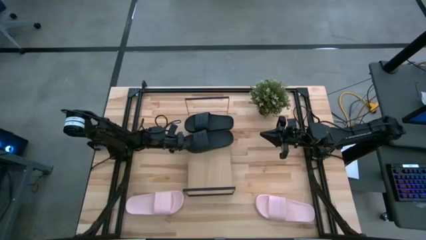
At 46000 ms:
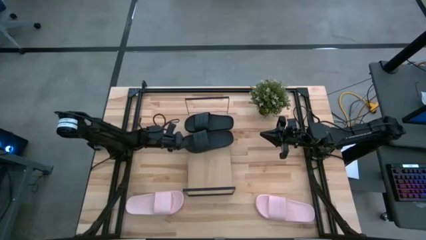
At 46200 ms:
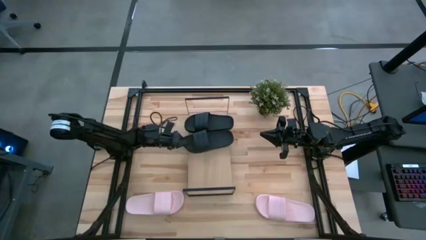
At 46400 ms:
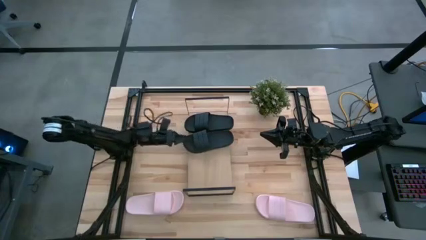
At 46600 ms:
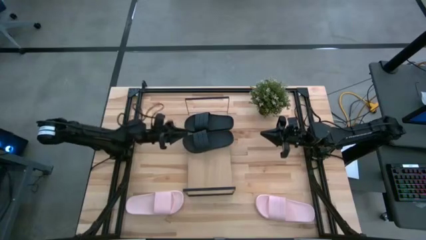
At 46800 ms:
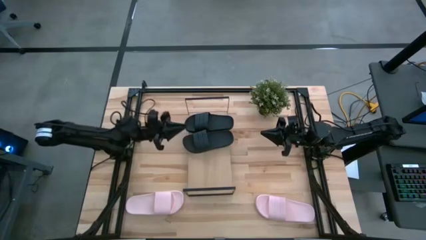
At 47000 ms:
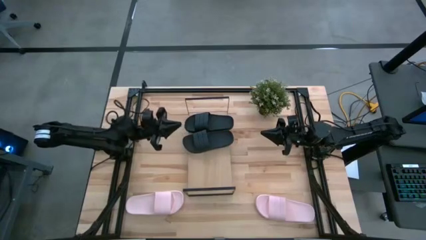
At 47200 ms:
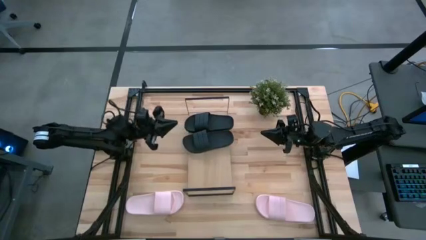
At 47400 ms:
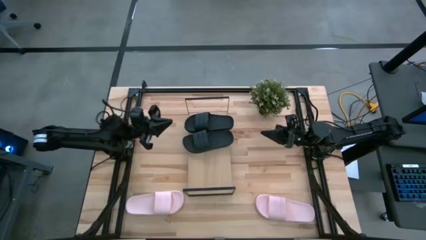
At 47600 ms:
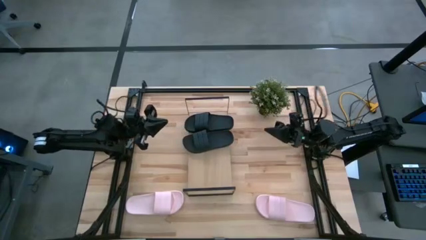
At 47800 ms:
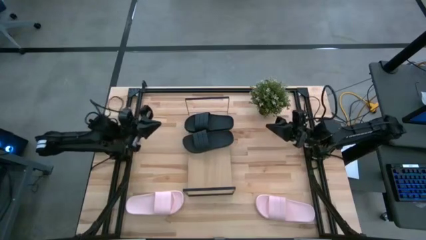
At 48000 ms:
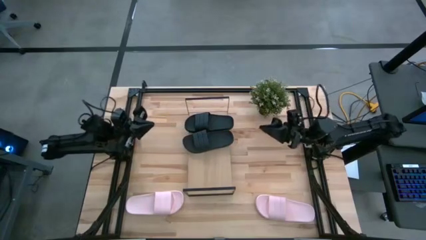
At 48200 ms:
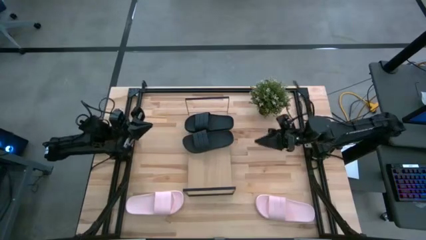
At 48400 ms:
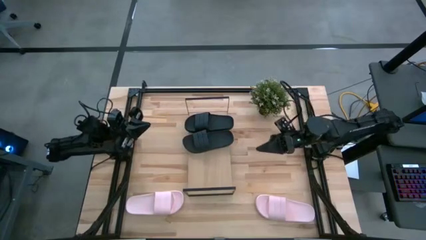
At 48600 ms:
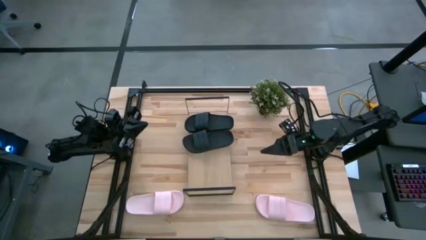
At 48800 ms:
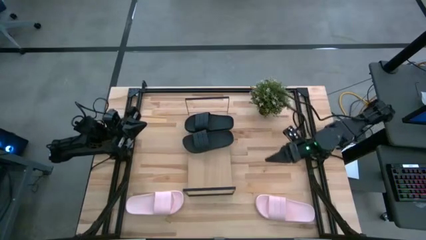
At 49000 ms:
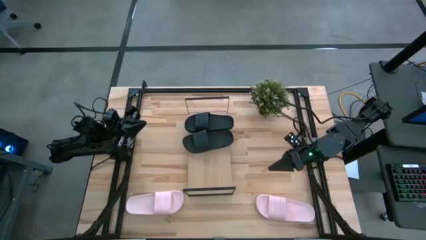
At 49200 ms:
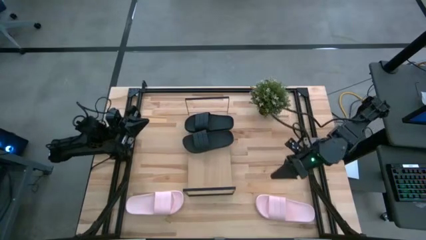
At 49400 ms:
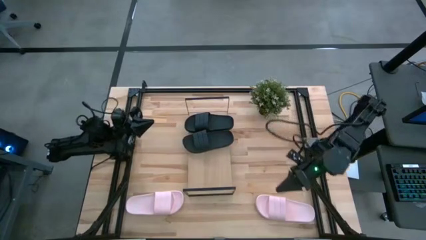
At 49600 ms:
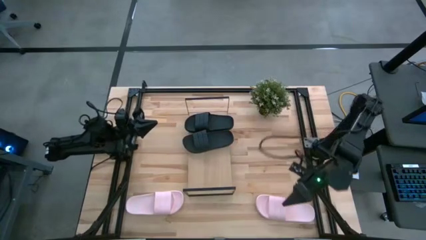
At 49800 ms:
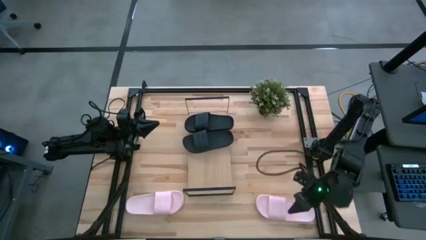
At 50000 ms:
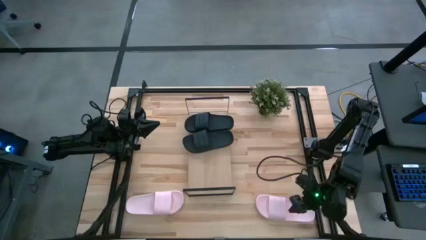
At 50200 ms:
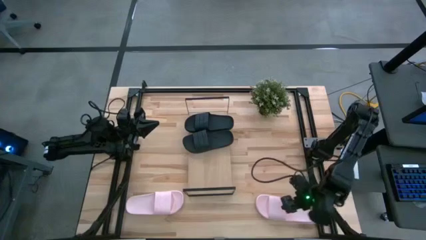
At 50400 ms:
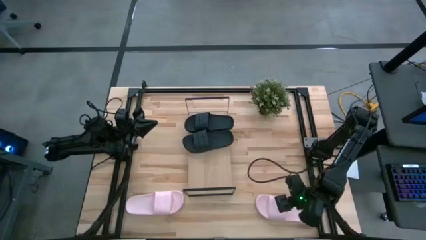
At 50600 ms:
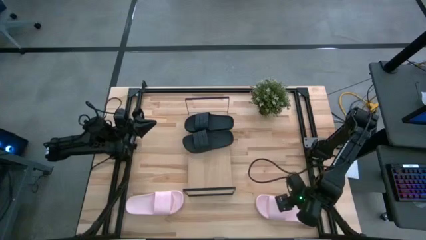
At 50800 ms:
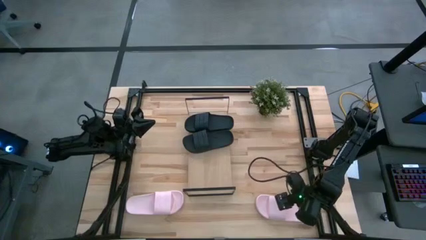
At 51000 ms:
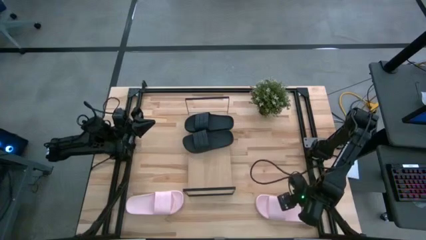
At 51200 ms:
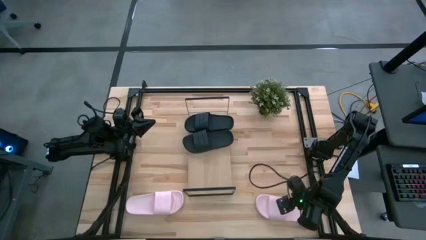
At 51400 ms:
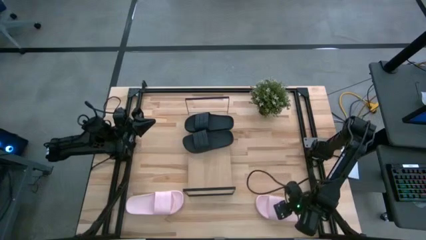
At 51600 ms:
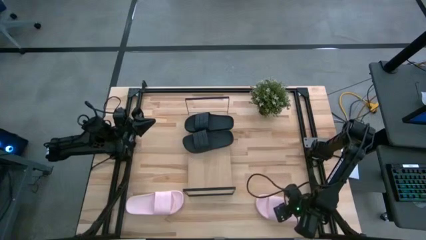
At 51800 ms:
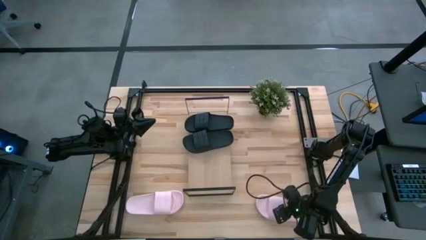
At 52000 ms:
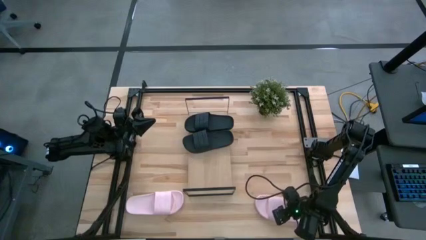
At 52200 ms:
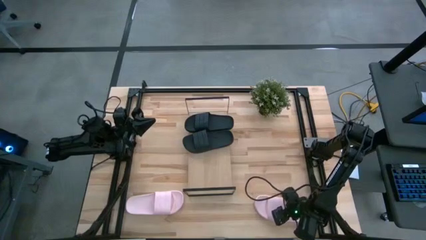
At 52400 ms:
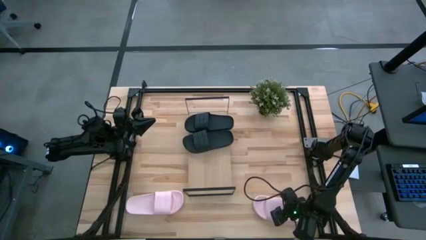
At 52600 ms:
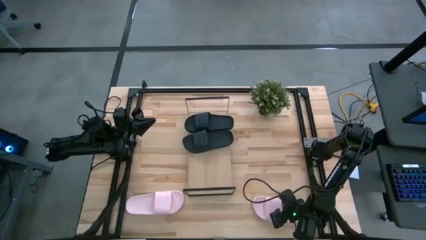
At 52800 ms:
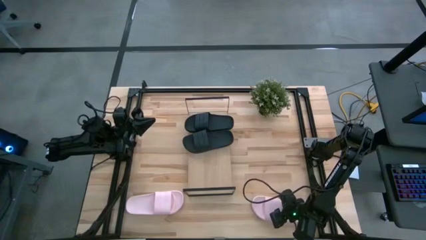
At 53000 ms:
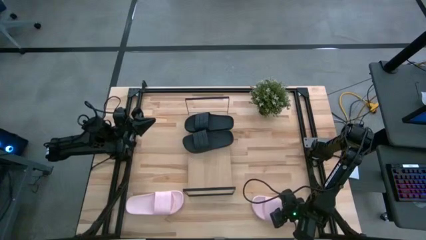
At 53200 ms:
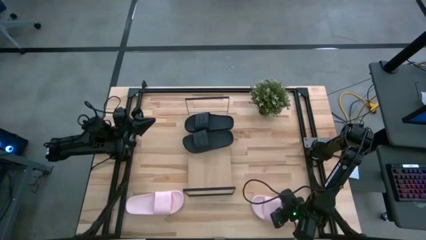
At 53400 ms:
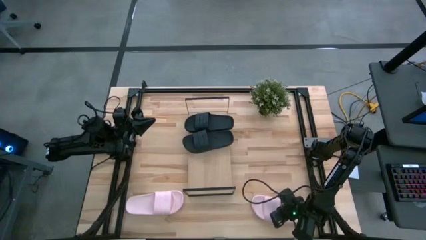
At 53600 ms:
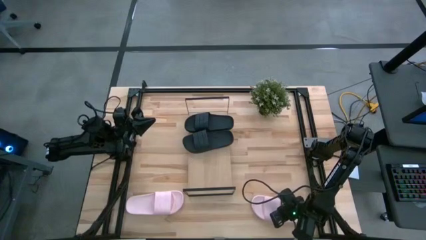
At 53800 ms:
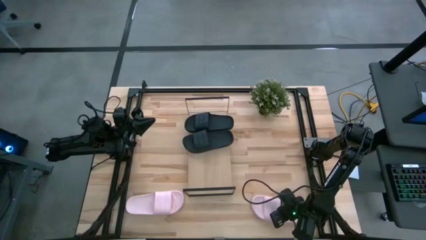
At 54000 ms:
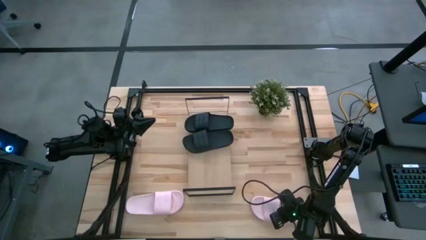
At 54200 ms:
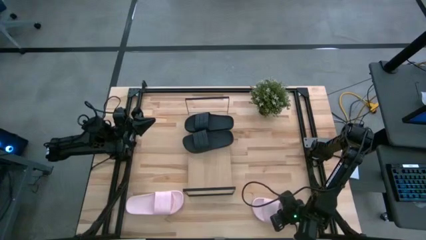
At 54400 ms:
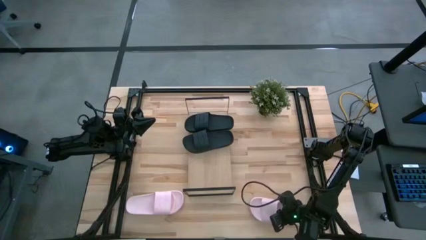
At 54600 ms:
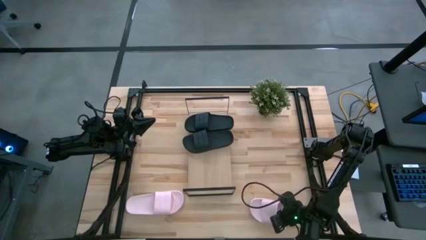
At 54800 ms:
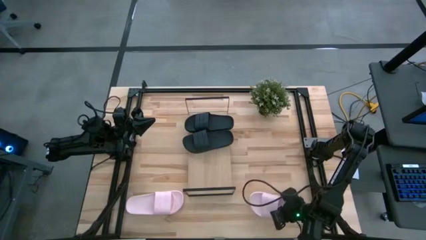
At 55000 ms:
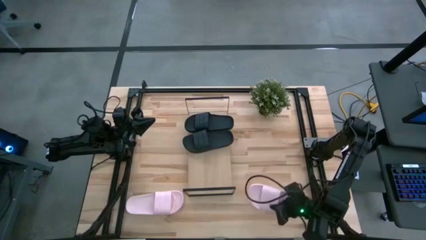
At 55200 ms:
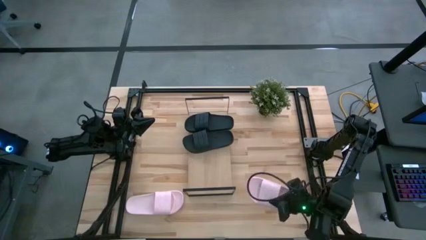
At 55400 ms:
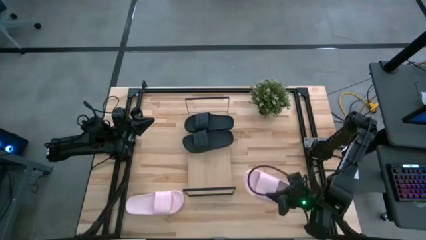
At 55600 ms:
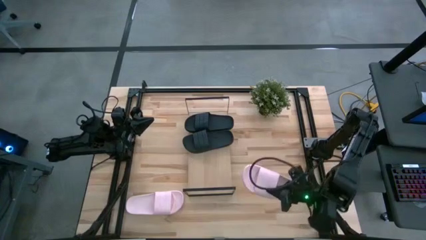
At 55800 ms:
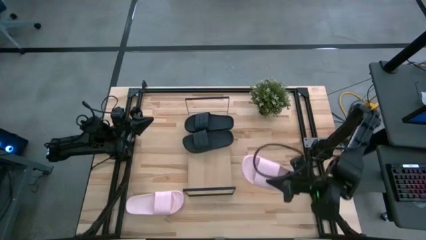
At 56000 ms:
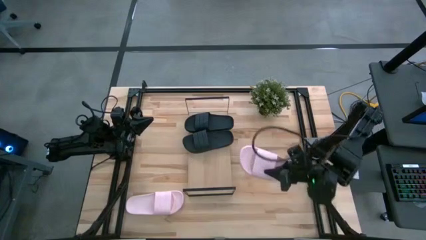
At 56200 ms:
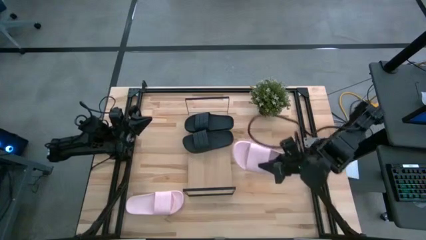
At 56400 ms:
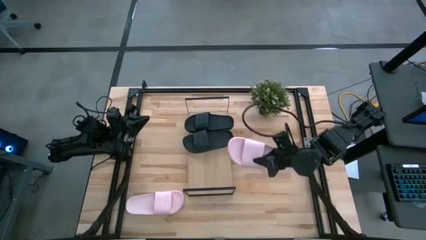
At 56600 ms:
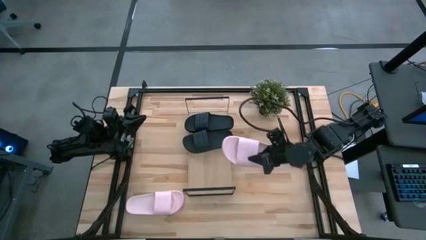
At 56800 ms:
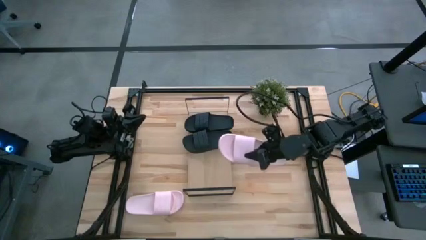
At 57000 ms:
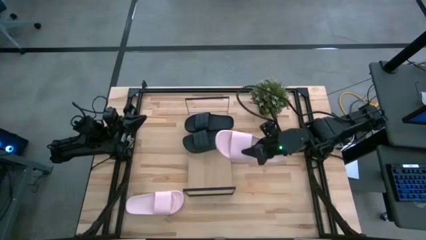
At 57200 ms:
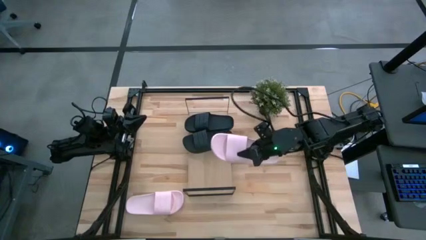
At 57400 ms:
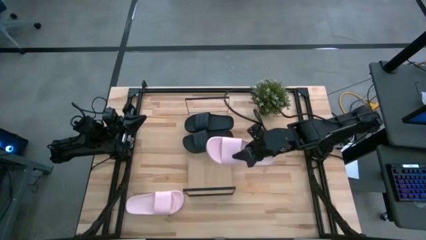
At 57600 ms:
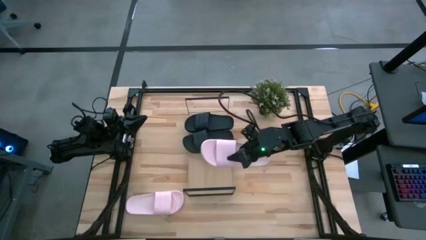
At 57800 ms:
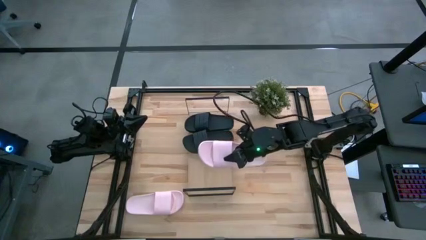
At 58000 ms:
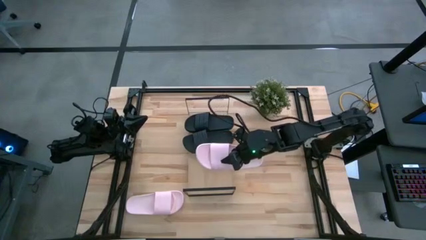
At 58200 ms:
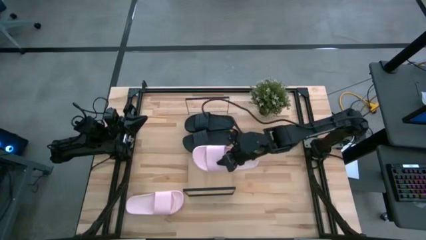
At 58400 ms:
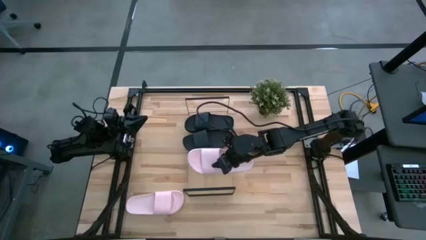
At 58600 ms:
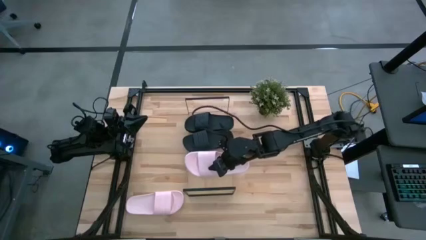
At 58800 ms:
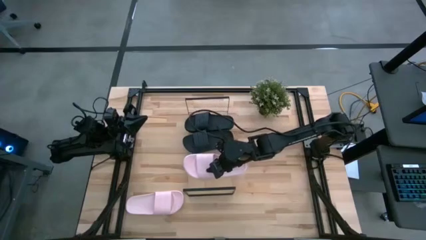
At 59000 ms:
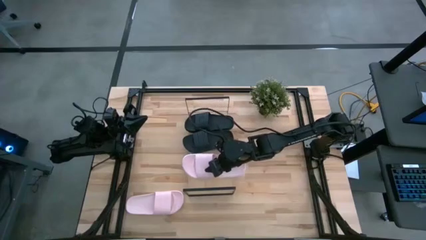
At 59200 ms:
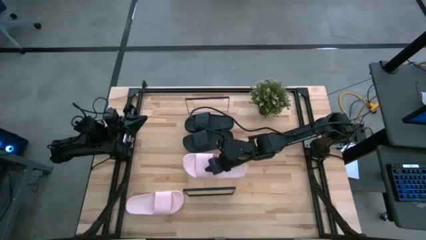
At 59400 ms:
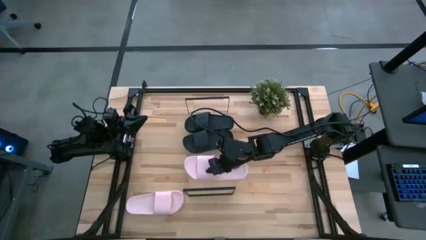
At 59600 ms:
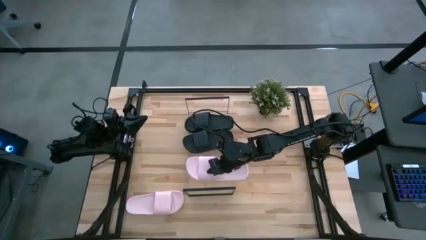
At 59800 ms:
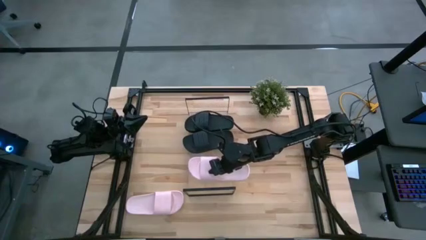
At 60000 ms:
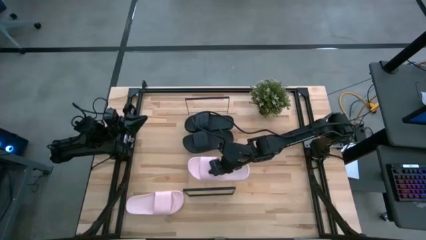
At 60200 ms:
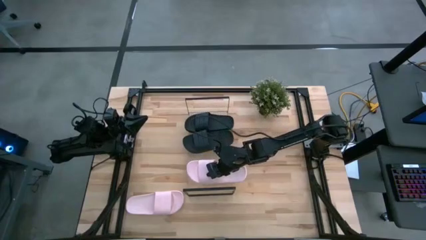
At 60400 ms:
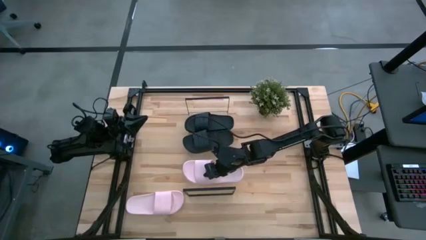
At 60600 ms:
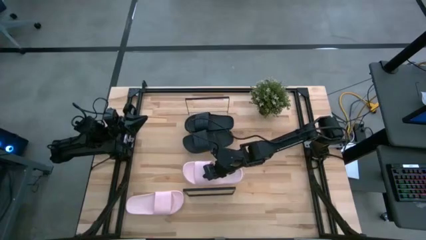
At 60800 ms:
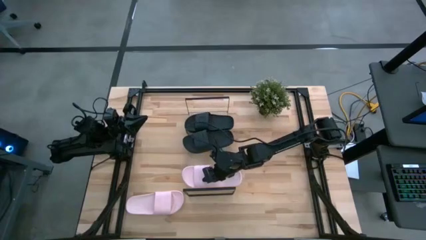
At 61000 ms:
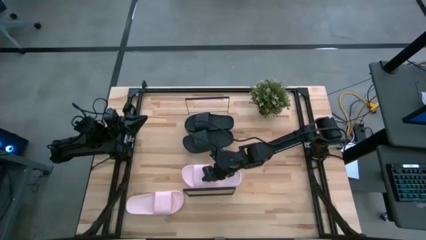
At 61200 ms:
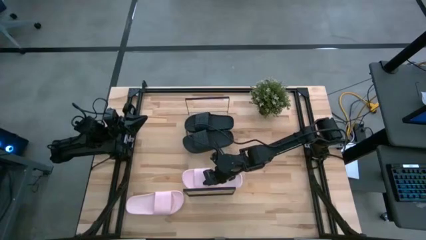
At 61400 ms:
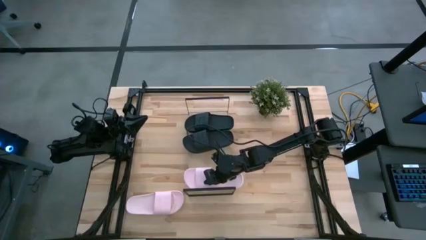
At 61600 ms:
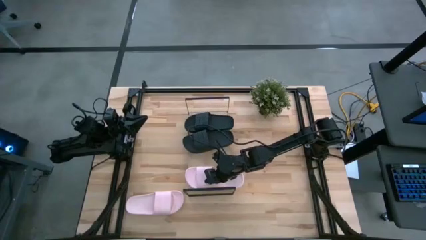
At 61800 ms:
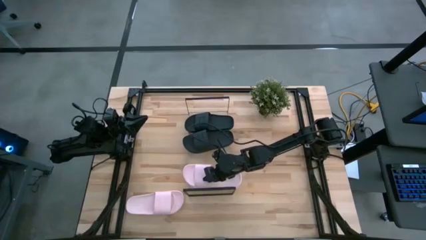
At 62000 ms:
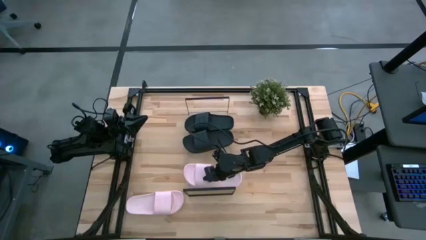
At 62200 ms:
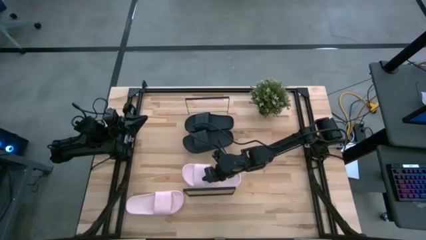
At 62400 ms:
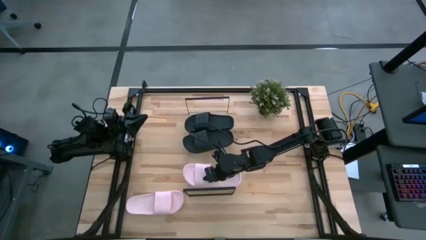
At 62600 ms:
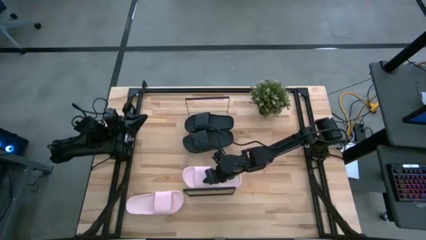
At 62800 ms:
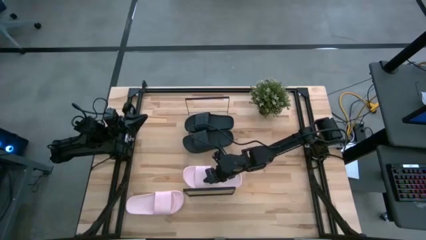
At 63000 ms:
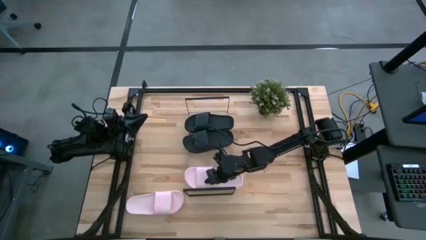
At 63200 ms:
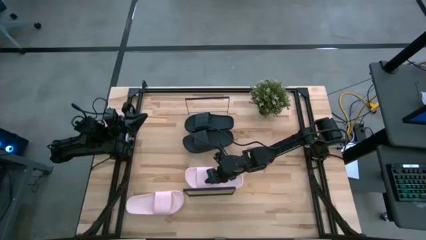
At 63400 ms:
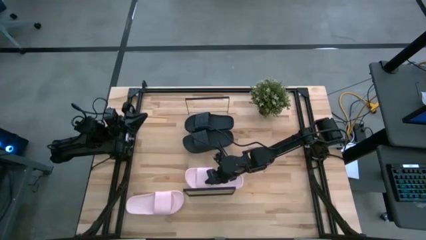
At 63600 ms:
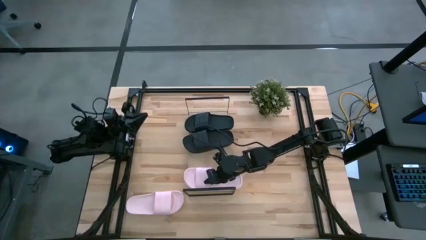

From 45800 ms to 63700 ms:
Task: Pick and place slides into the shelf
Put the right light pink slide on the shelf
